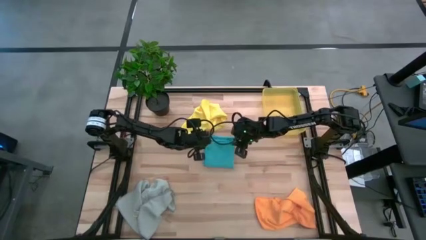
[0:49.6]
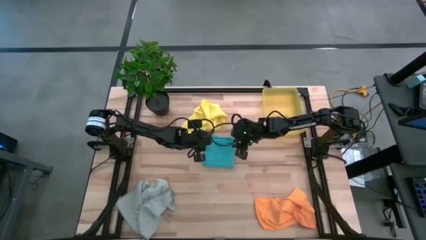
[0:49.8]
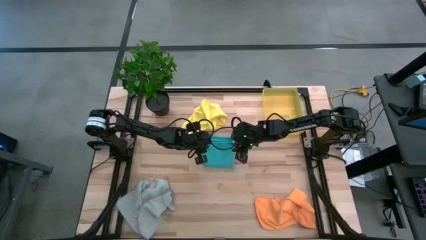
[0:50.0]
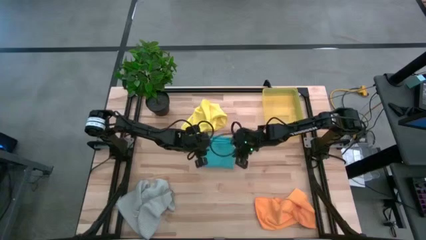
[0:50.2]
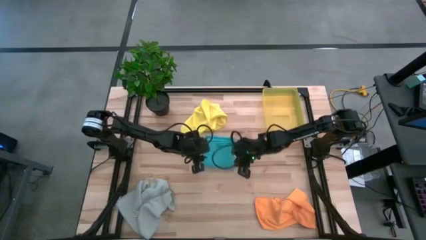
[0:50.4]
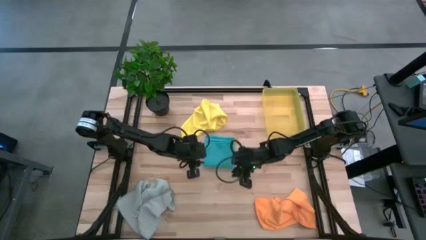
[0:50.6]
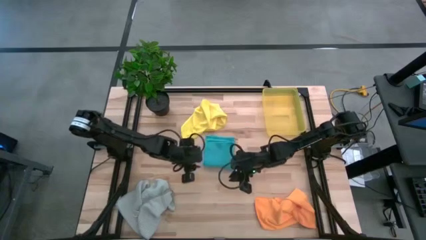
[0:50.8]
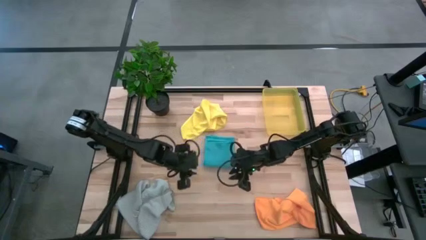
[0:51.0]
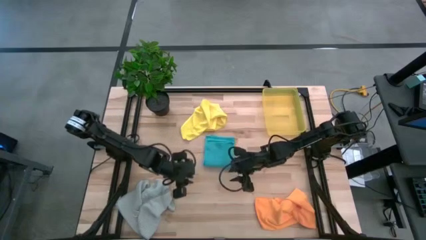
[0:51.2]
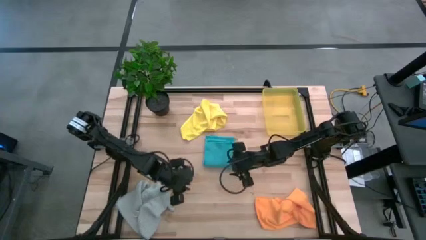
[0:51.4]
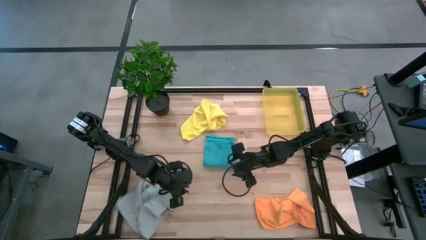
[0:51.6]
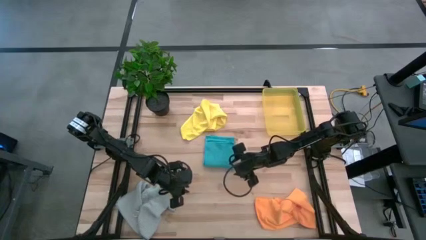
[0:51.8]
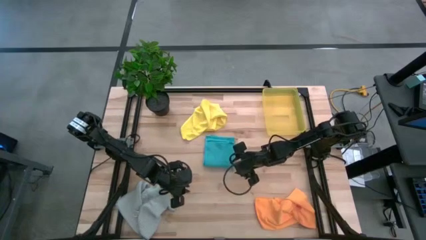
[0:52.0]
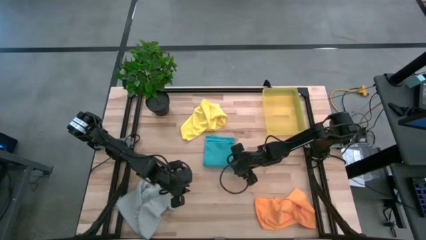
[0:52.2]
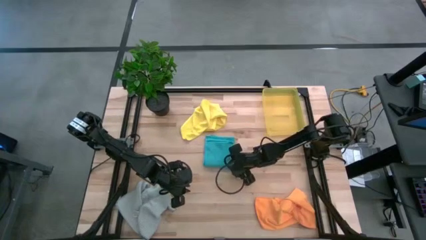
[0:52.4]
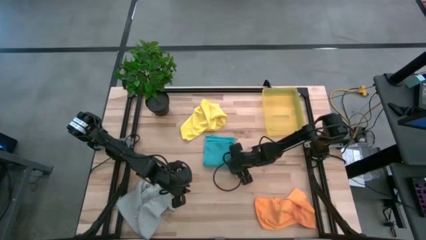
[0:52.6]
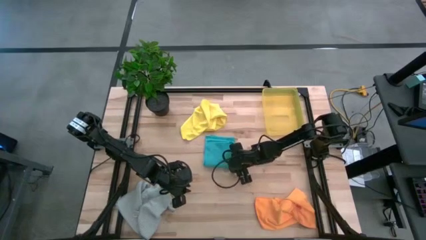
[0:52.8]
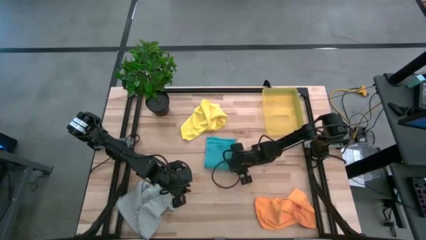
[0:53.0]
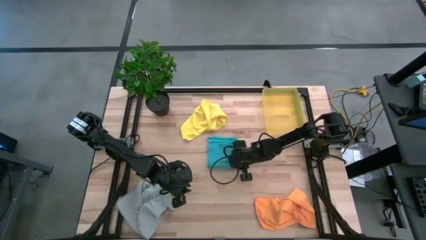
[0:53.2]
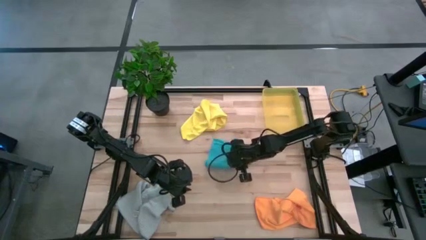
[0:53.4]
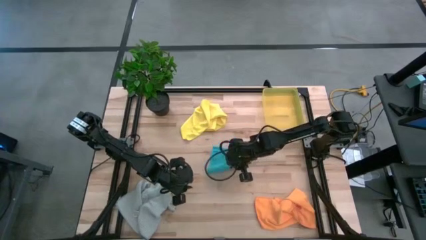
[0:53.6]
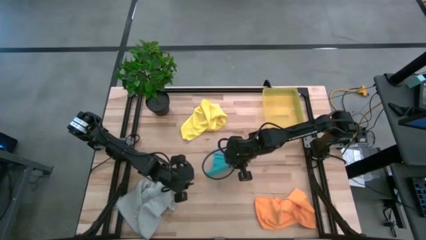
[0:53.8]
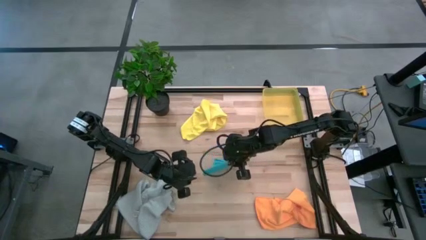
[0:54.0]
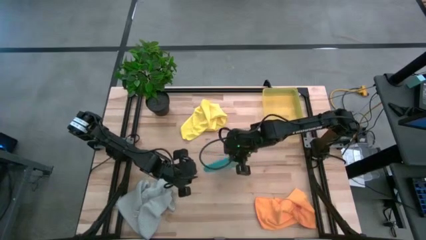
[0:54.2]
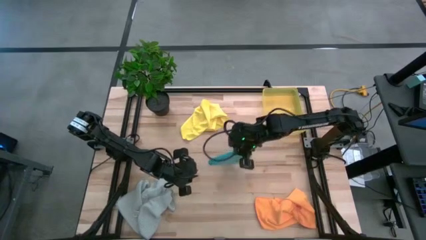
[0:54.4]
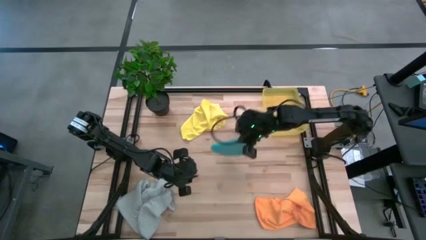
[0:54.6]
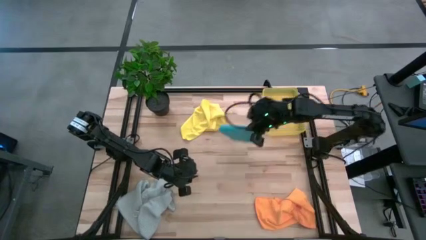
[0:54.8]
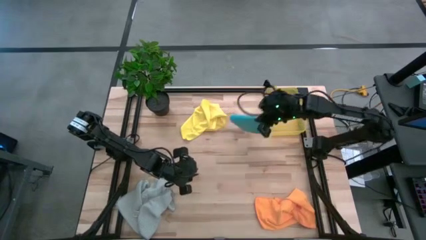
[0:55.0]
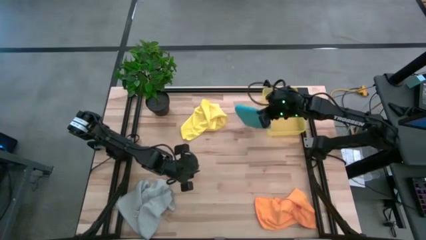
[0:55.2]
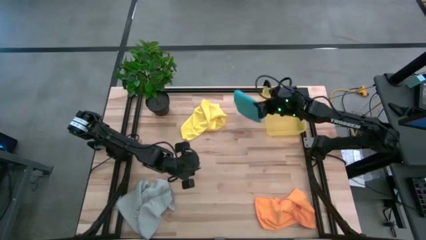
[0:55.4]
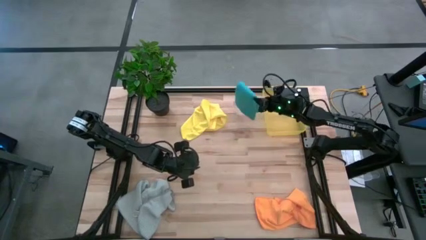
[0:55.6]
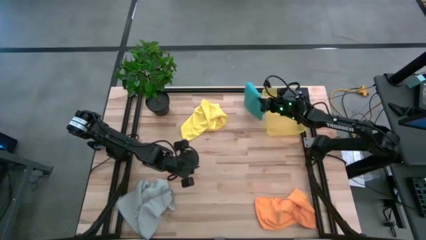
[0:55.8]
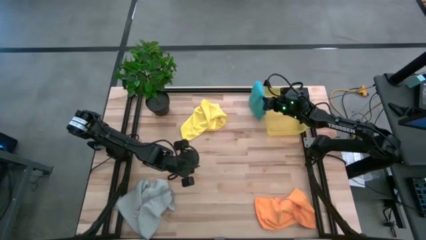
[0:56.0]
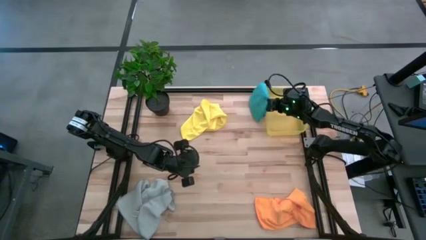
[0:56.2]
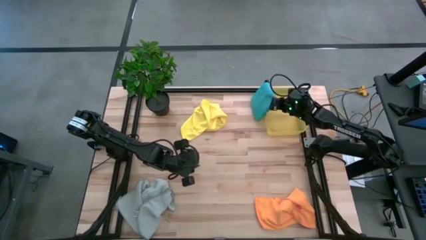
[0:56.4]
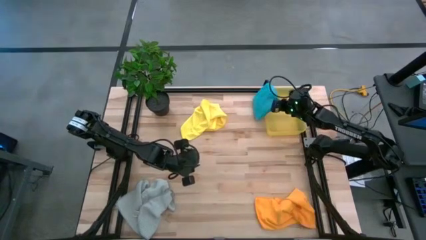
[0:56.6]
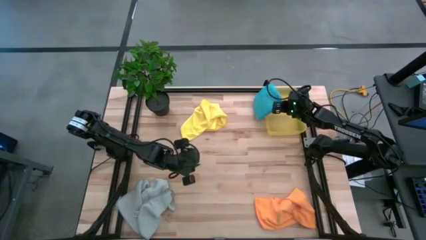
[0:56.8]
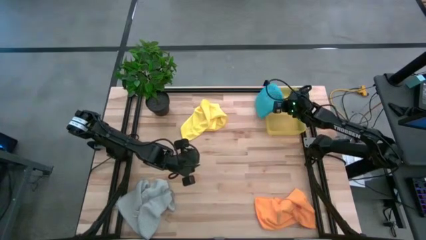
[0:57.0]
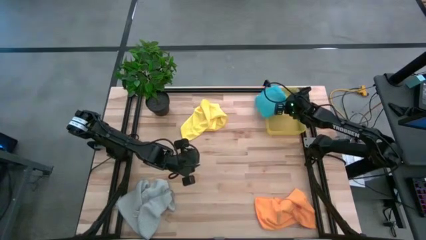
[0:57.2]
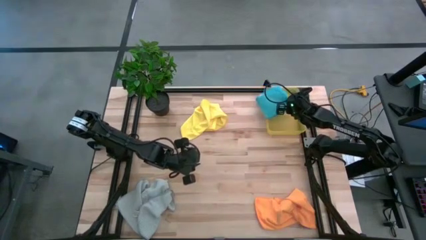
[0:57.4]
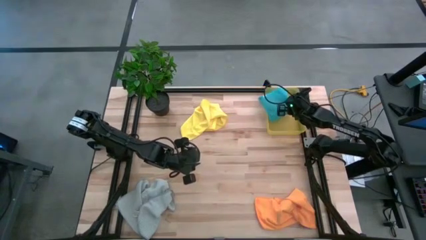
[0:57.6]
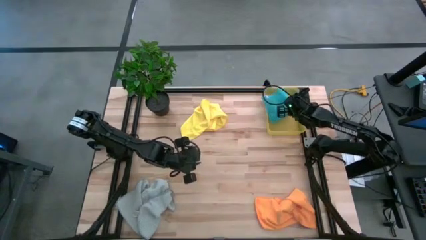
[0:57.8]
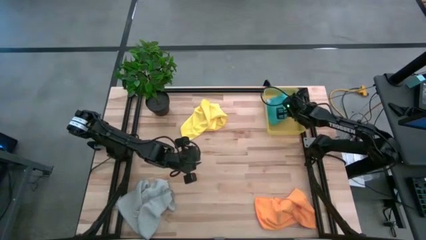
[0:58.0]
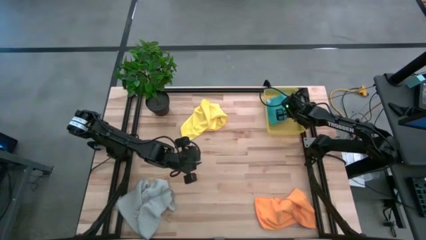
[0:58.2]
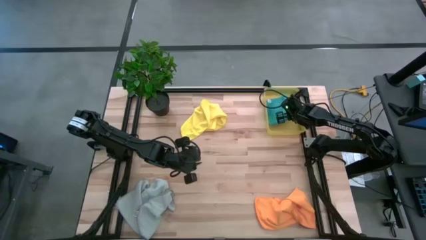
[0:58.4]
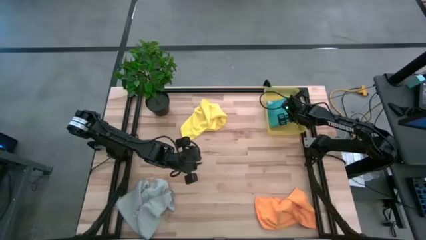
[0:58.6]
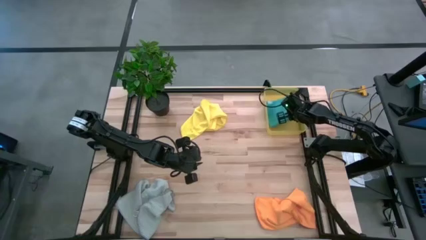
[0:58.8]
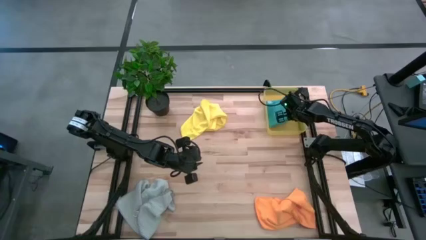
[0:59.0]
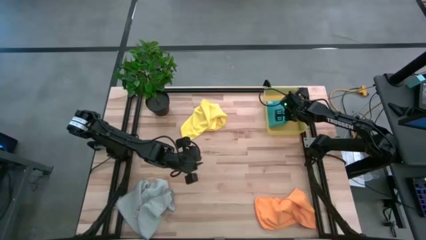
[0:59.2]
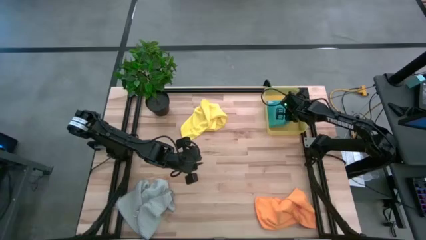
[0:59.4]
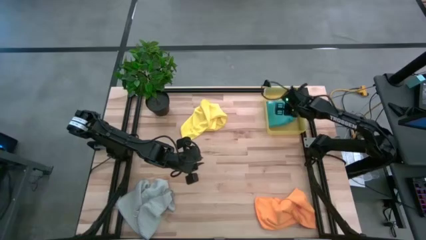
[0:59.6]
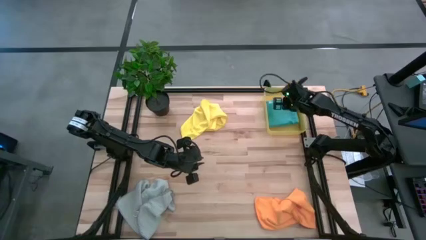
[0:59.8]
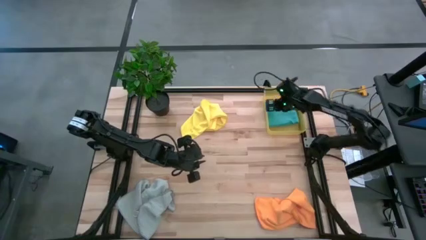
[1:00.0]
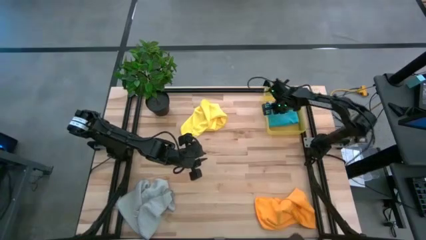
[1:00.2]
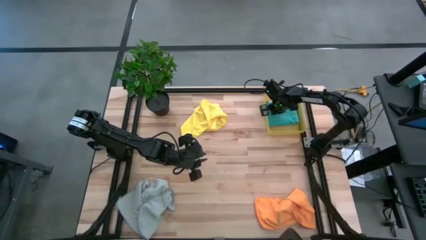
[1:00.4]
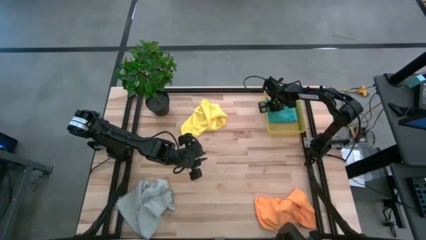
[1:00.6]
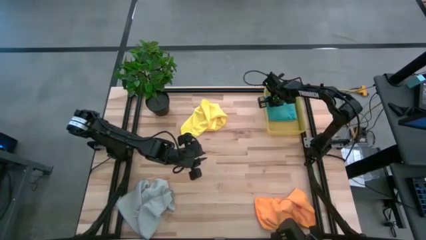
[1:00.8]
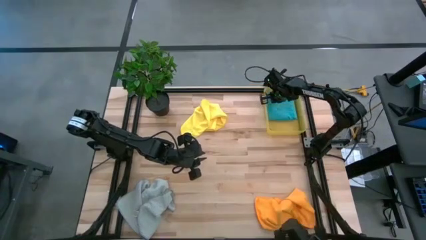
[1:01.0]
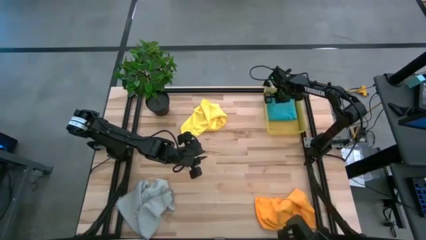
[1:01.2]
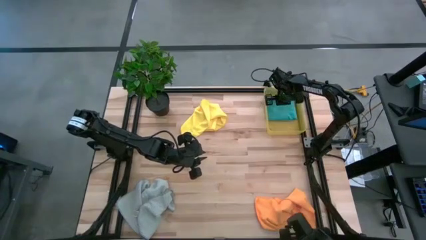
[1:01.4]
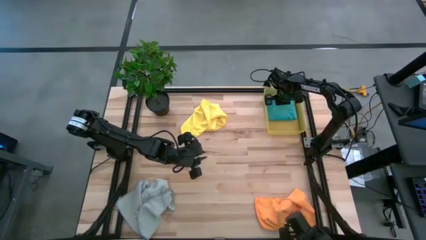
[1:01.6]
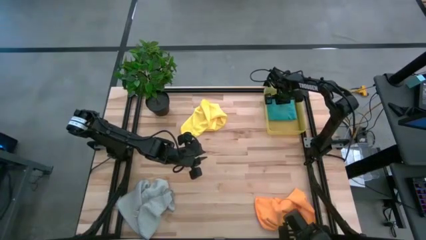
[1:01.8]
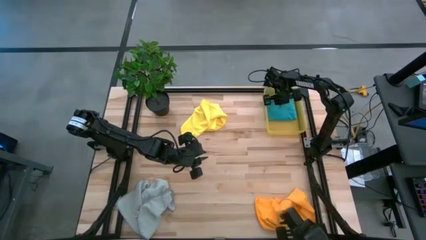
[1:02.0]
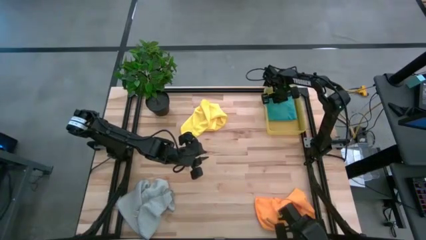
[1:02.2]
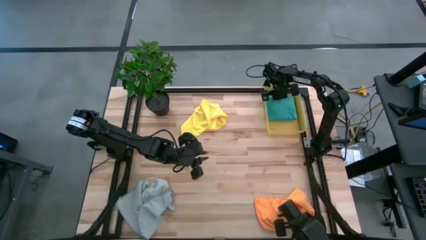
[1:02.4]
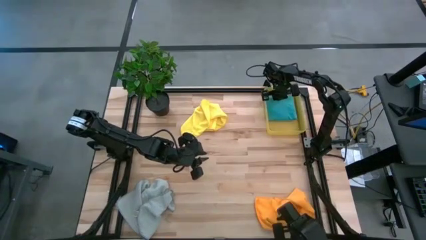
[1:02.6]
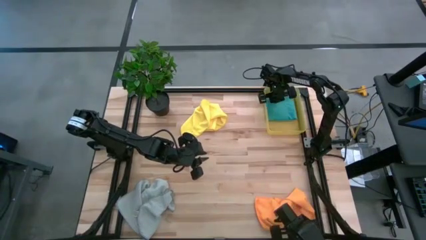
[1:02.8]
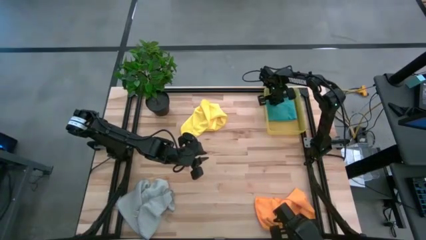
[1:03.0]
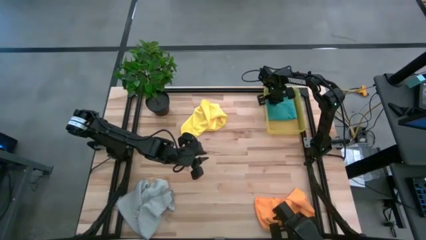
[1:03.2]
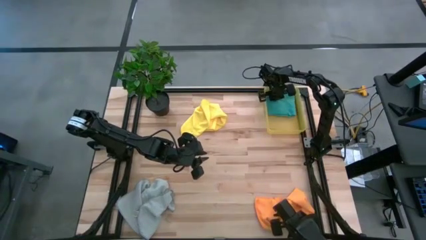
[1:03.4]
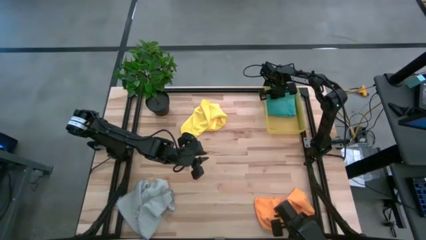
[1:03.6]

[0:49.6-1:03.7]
Task: Fold microfiber towels
Put the blue microfiber towel into the yellow bin

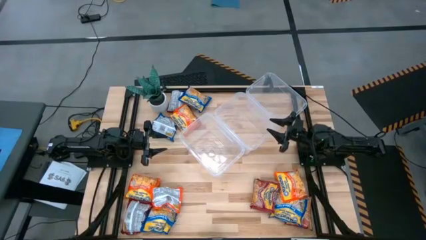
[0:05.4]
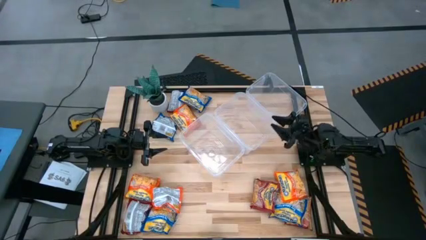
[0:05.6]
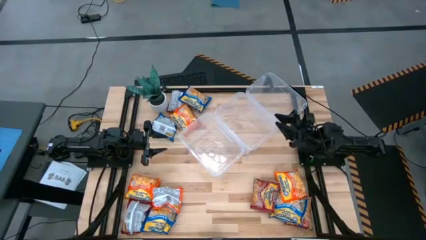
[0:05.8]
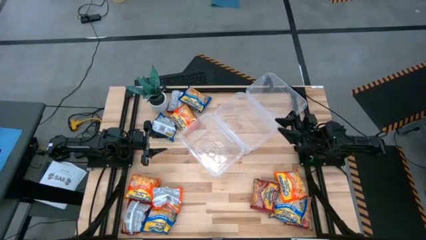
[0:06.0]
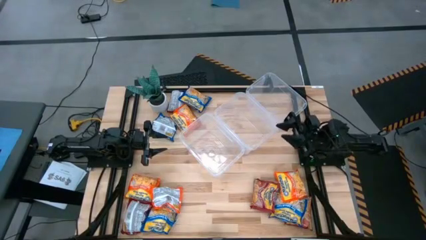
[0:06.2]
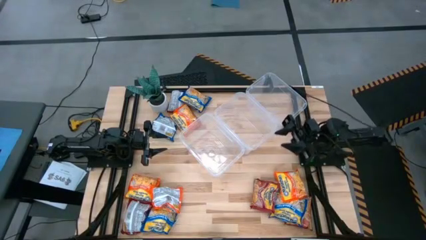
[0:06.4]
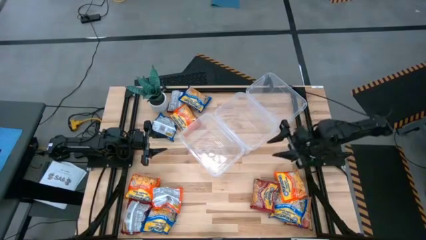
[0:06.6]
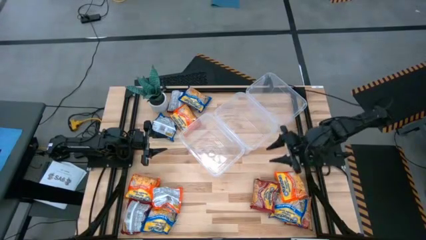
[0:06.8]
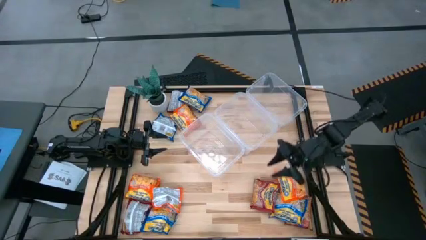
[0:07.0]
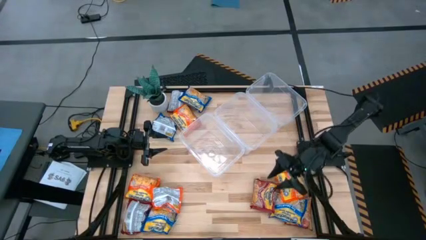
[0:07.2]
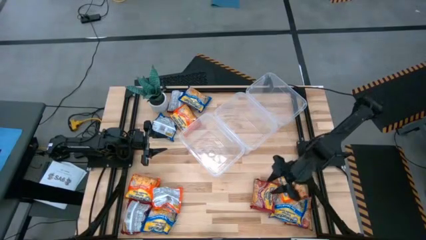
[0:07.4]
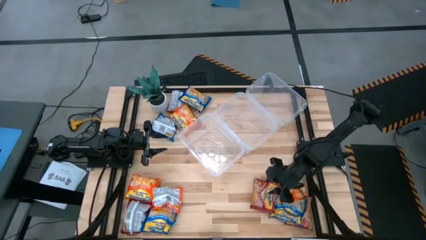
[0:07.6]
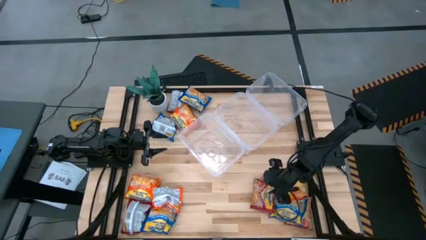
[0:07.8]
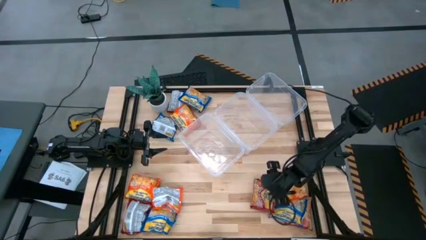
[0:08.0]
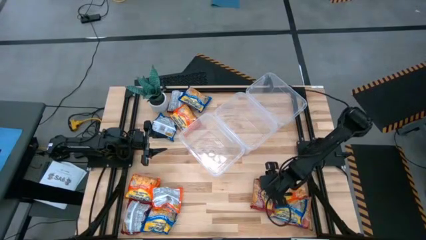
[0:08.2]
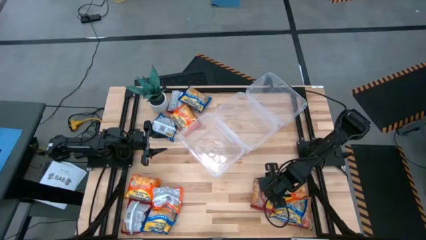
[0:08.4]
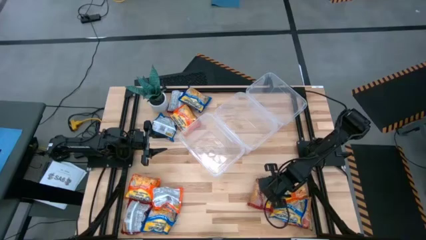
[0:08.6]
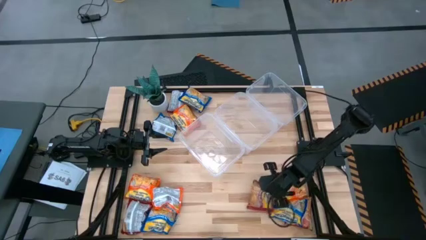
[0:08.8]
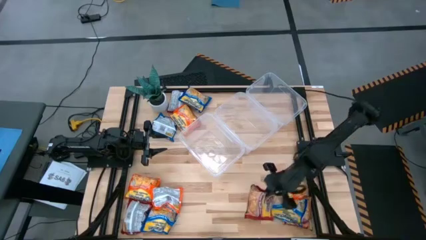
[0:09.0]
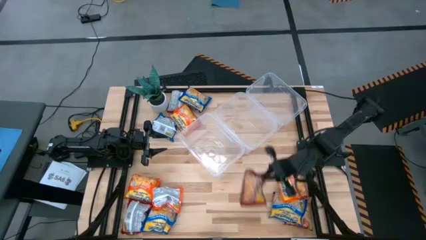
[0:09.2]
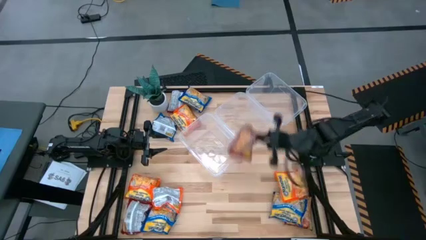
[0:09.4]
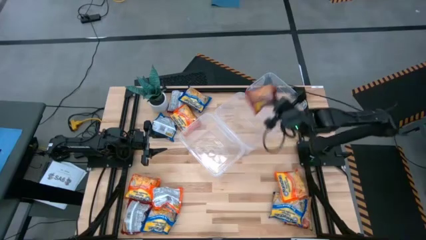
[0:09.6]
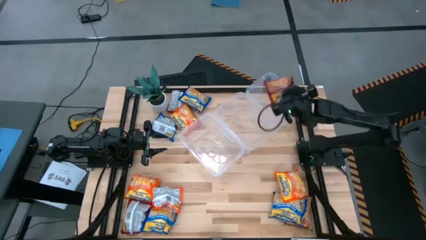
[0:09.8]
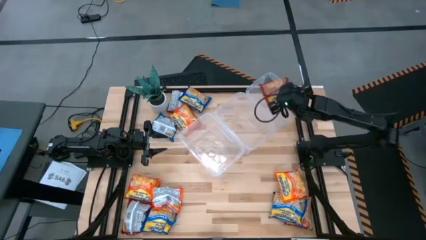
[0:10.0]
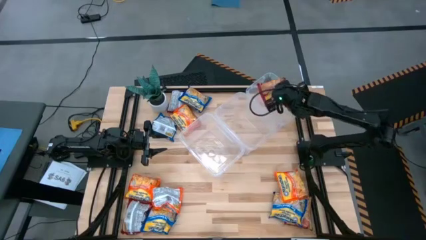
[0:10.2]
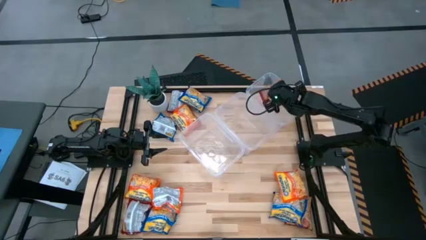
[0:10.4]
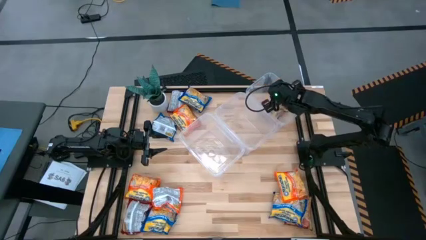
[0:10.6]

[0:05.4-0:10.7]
Task: Sort Maruchan noodles
Put the red noodle pack into the top right transparent bin
